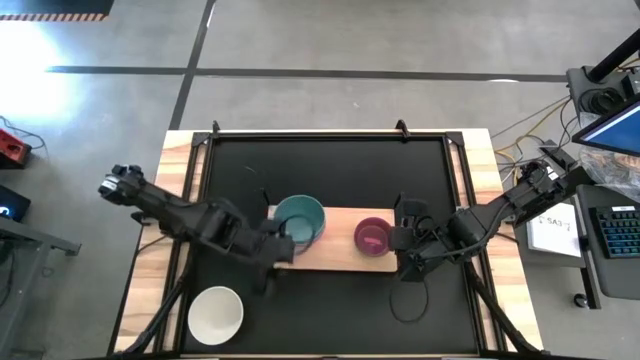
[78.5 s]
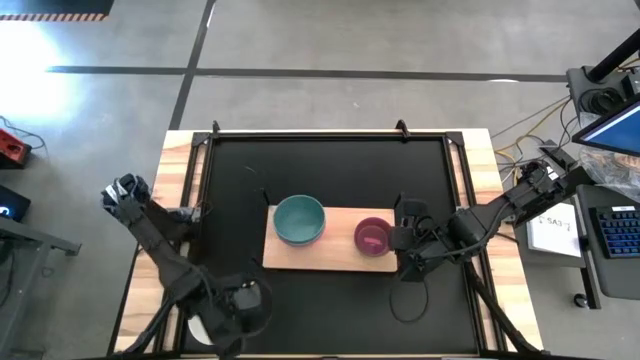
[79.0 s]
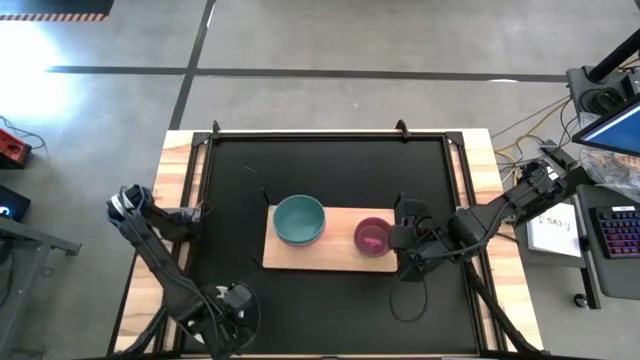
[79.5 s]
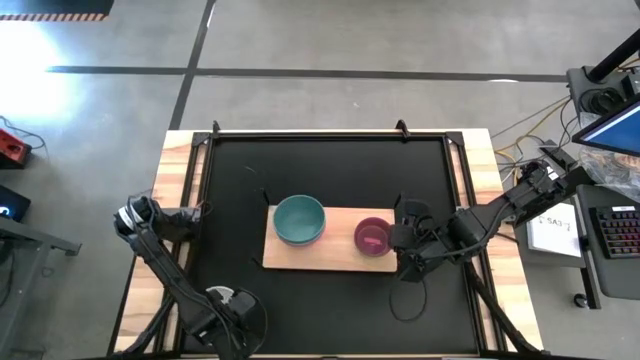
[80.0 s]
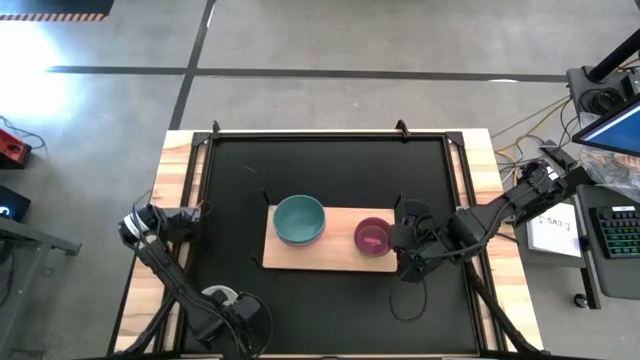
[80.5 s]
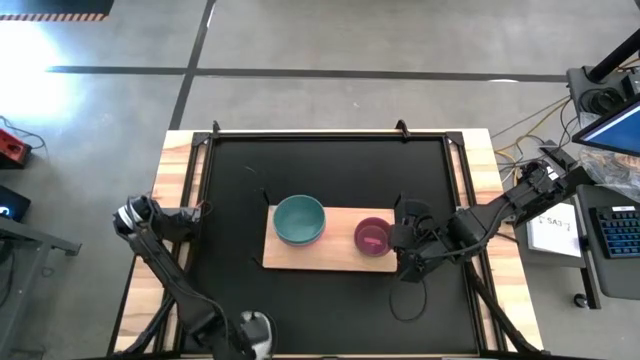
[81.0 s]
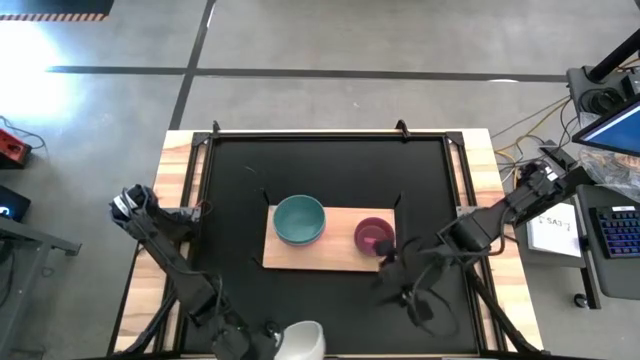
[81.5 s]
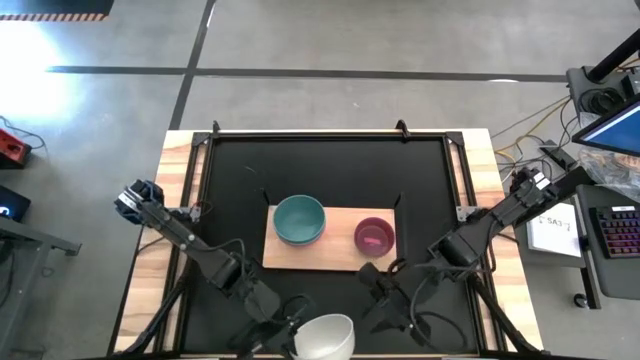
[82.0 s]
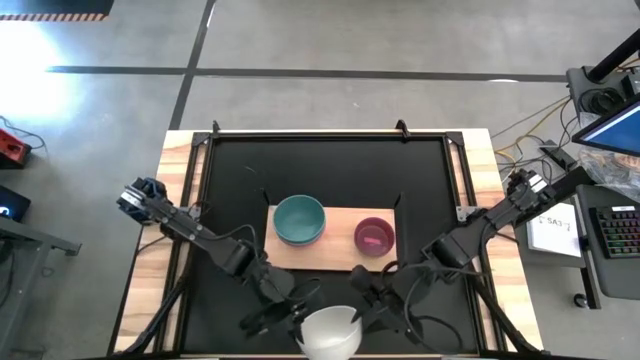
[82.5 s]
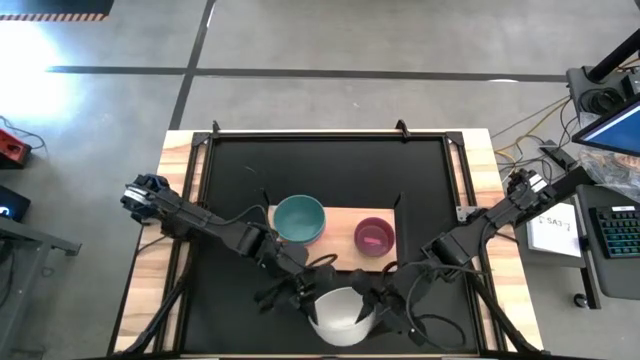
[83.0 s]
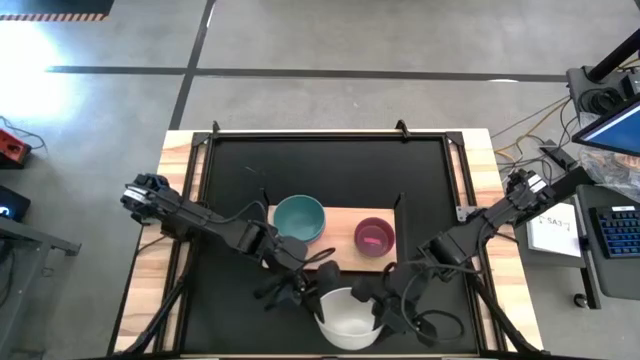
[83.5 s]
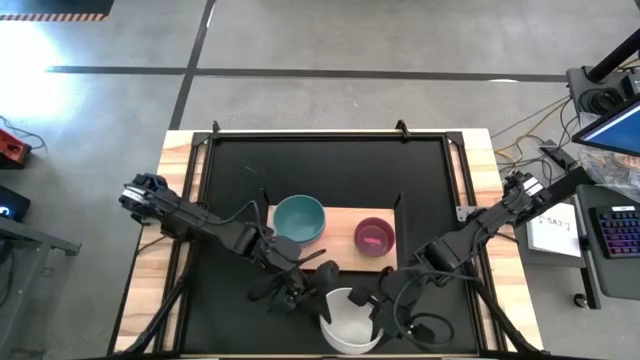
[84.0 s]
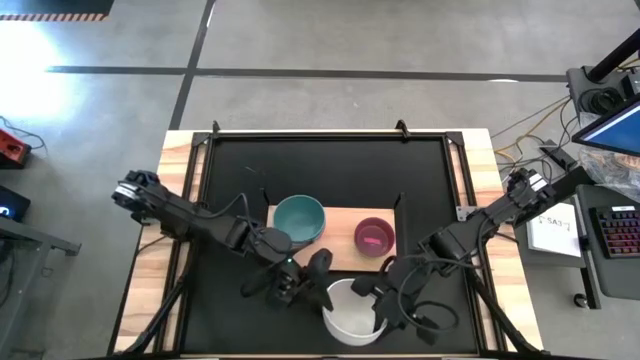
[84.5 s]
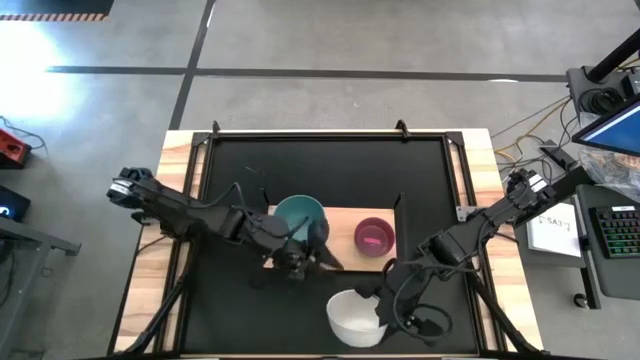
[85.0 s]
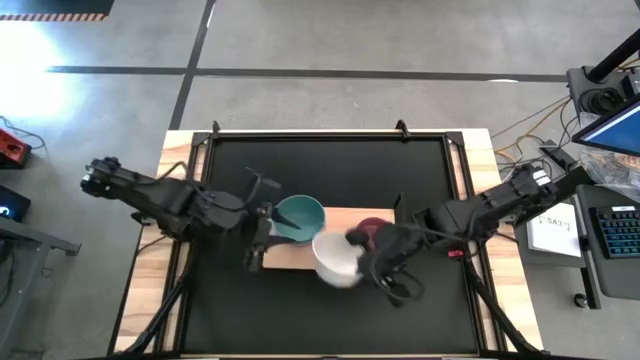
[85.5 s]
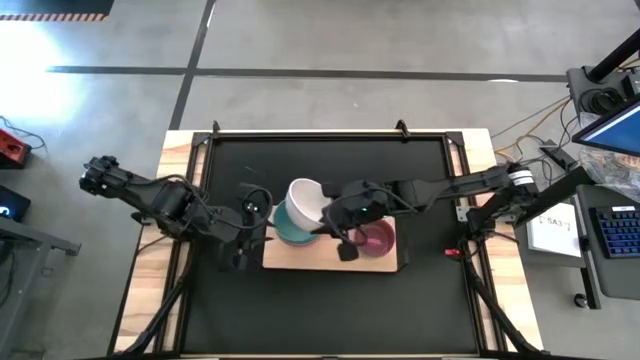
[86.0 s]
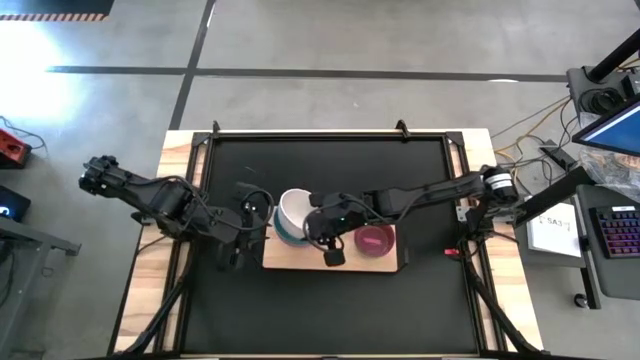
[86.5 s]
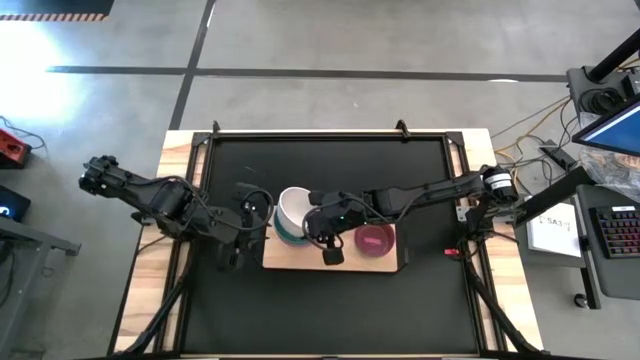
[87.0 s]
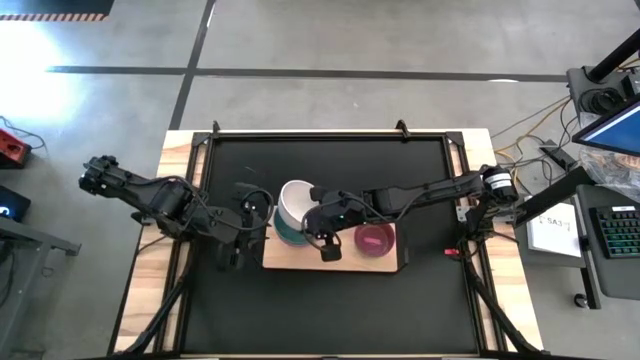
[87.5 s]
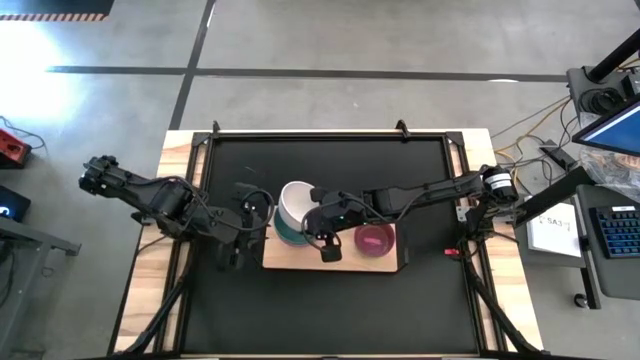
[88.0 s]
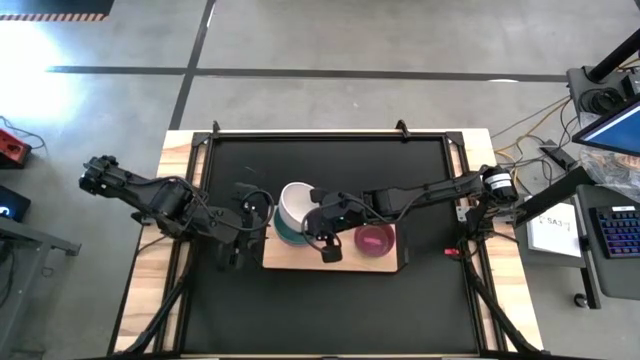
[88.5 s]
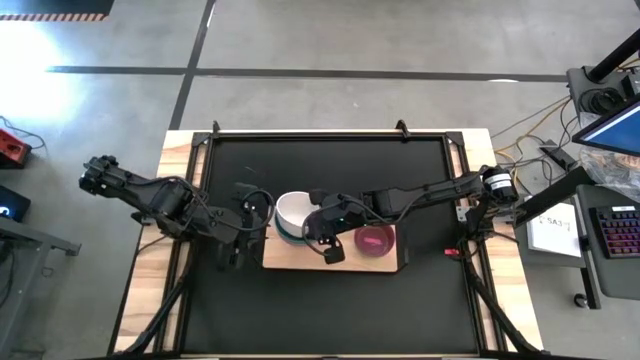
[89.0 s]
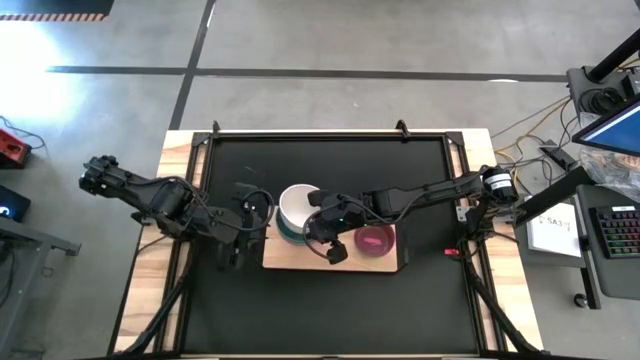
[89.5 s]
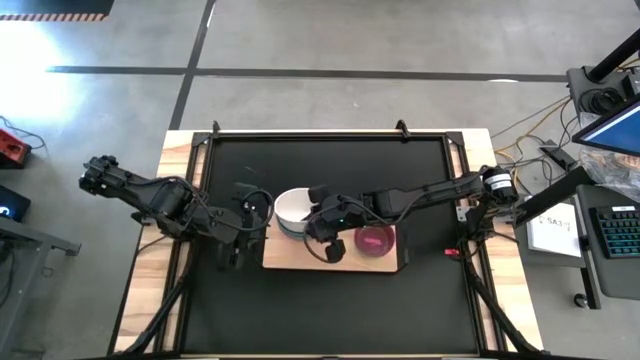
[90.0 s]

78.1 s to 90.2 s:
Task: Place and stack bowls onto a shelf
Stack the white bowl on top of the green bowl on the shelf

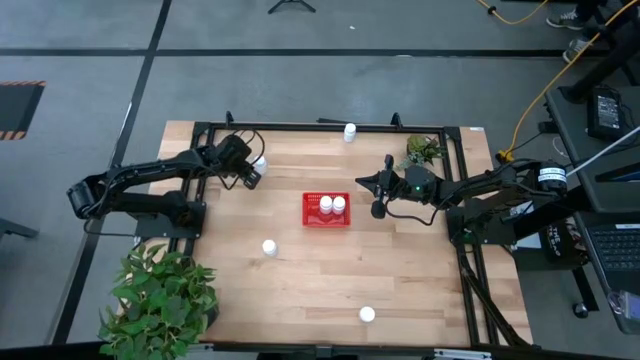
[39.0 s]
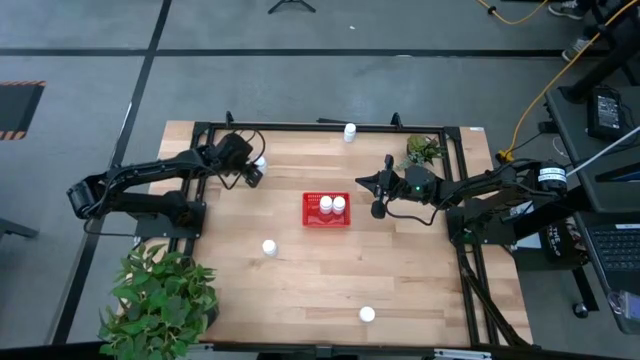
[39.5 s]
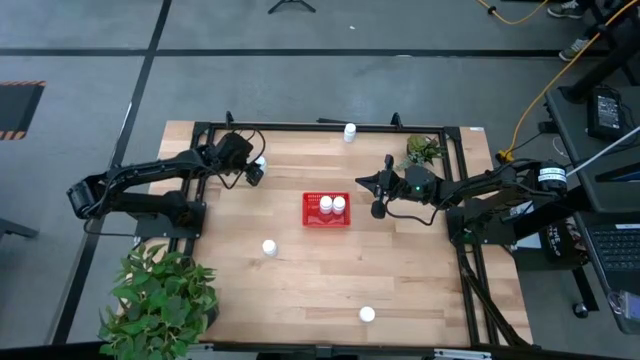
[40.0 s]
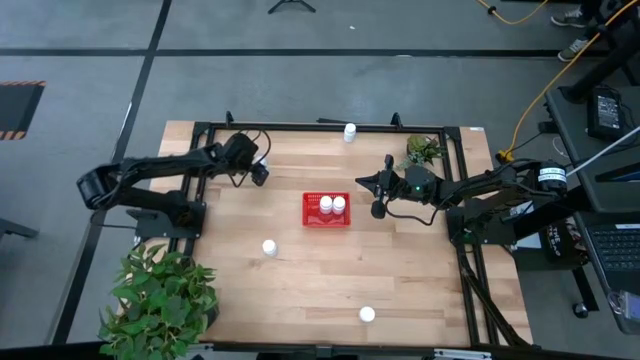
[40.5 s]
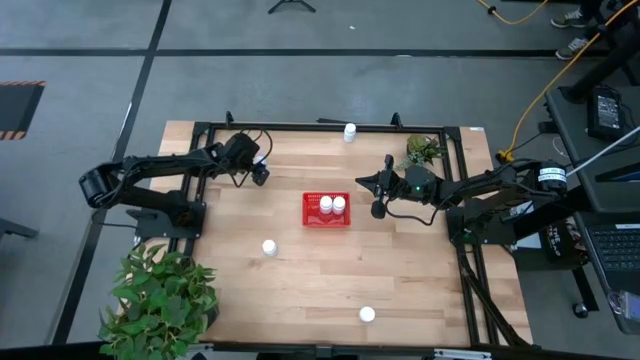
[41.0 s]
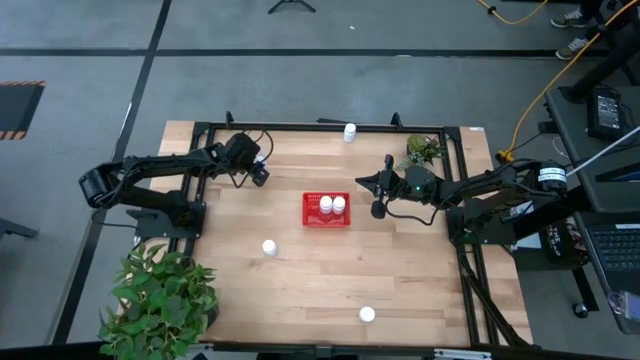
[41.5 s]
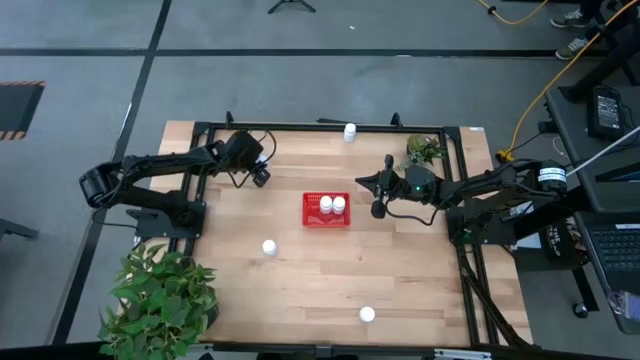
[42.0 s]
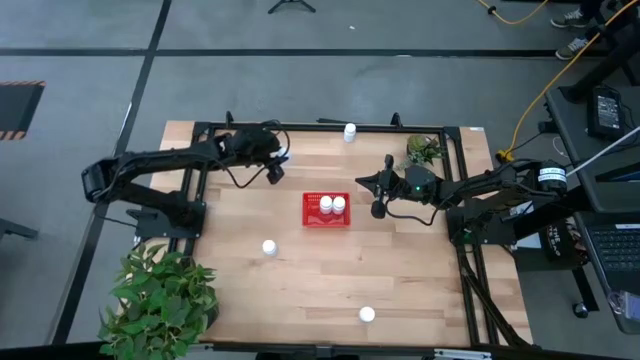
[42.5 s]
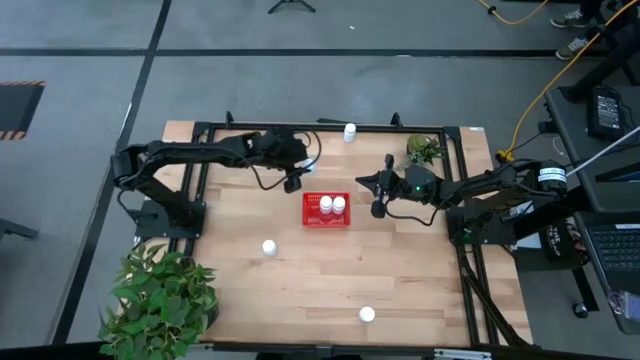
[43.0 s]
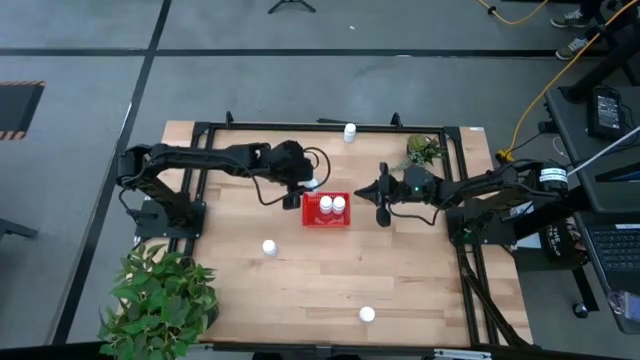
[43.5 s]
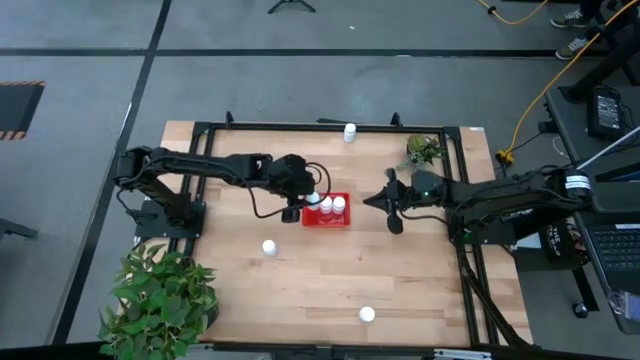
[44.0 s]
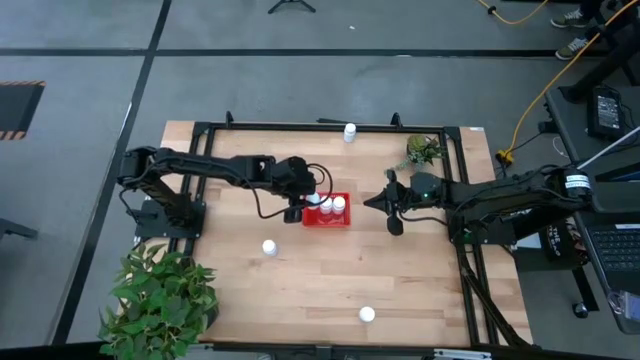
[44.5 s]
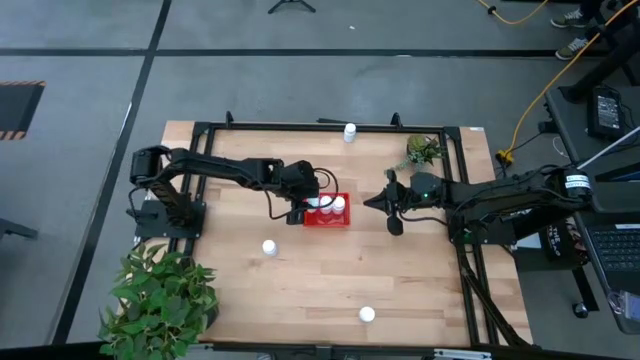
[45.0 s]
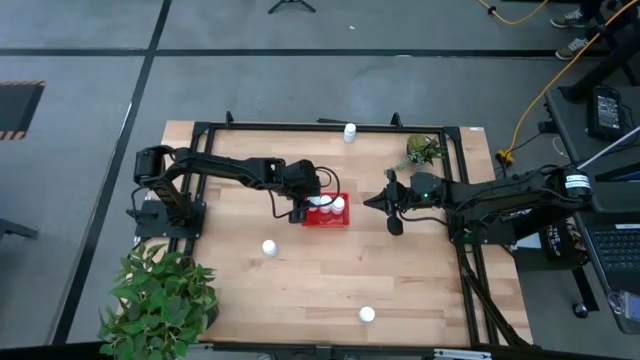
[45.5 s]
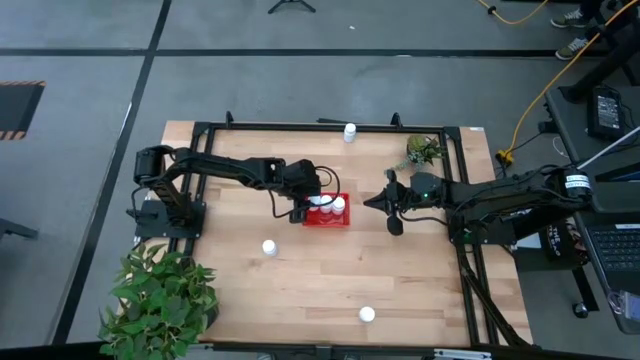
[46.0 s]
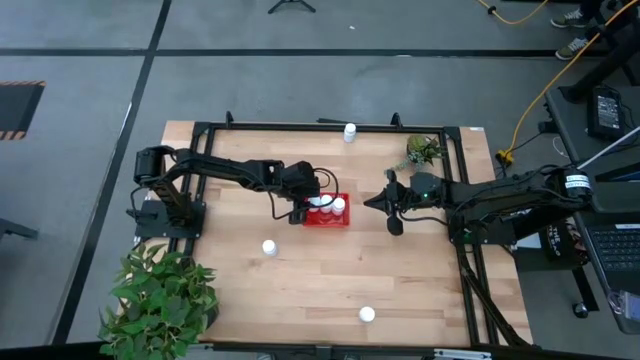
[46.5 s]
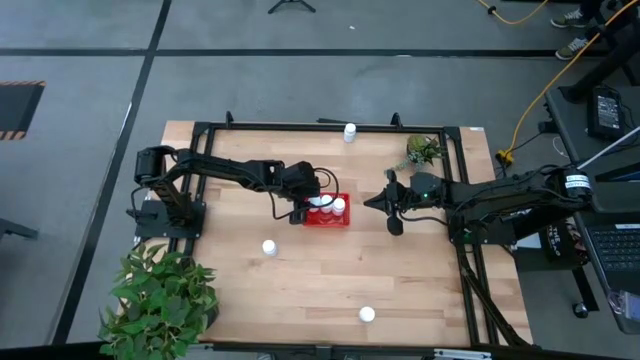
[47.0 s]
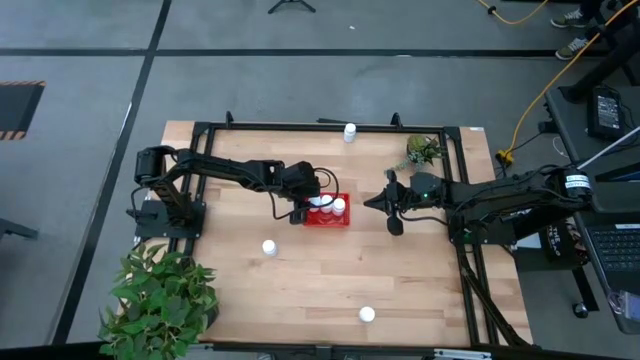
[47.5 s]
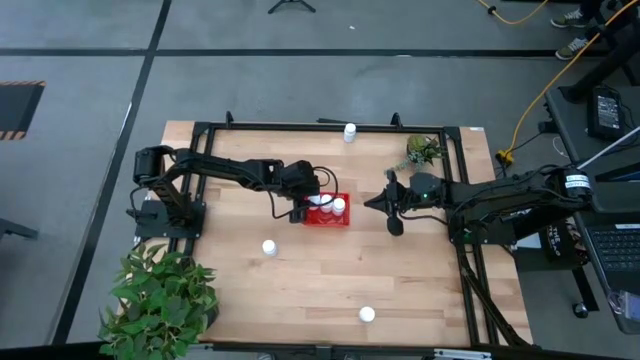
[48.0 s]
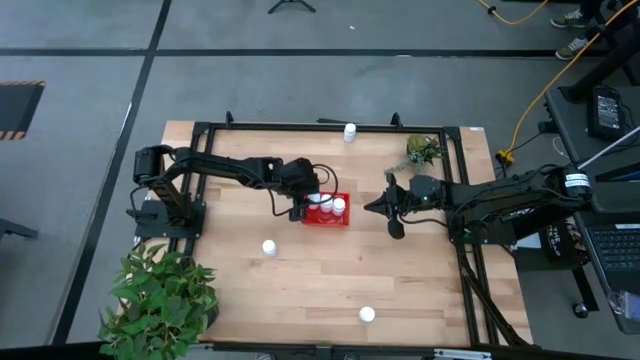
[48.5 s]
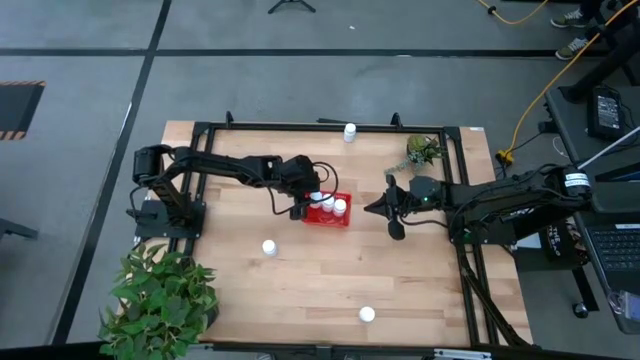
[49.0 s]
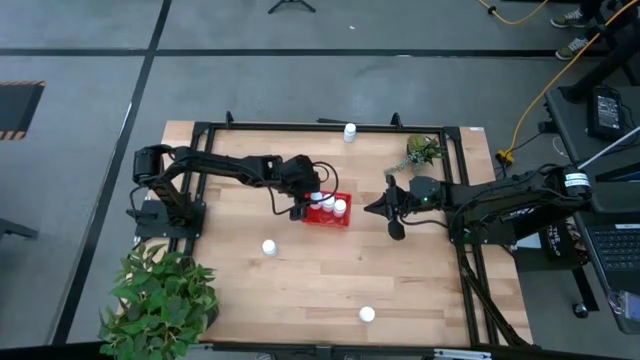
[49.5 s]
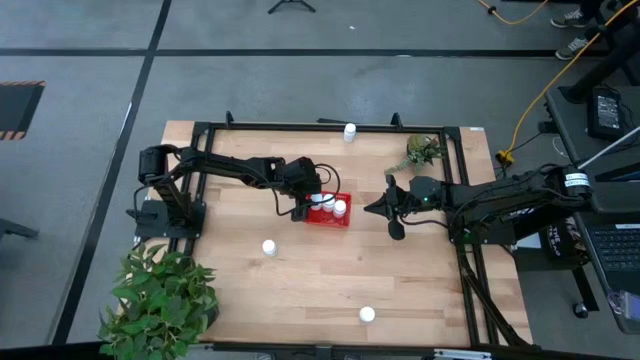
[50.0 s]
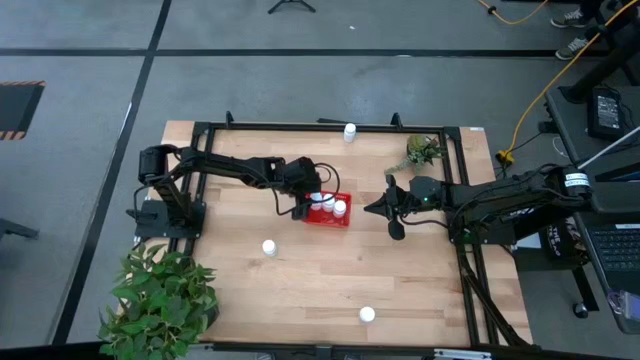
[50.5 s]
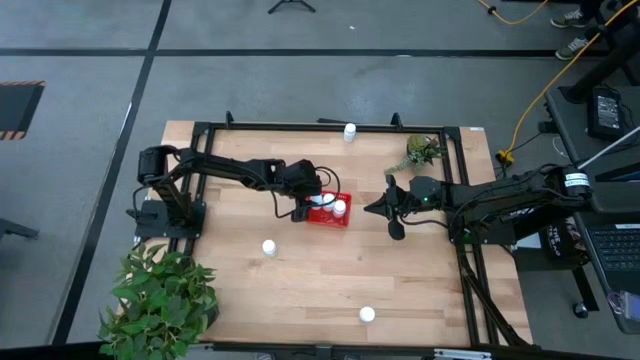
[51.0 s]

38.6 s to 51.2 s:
Task: Pick and place pill bottles into a basket
Put the white pill bottle into the red basket
